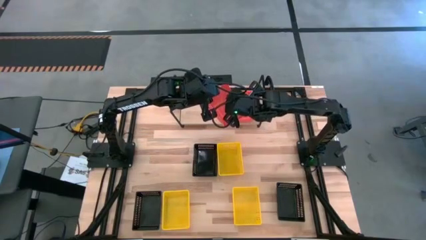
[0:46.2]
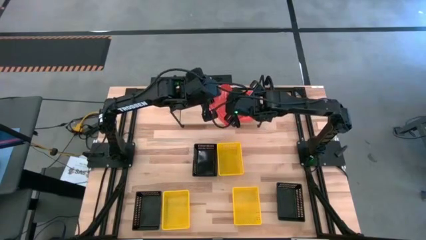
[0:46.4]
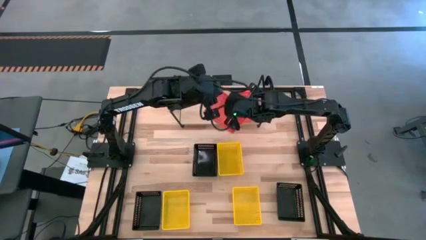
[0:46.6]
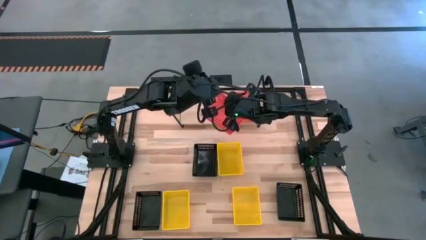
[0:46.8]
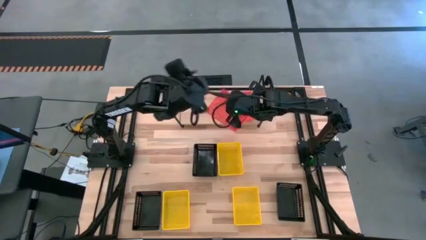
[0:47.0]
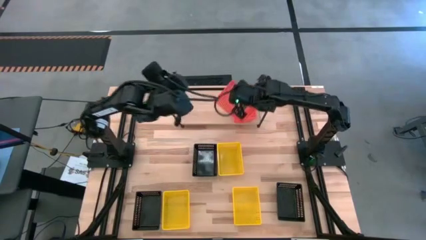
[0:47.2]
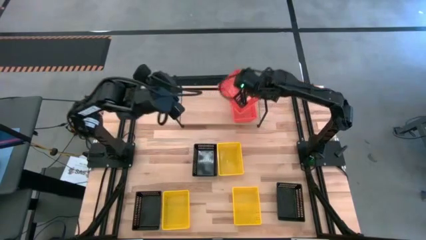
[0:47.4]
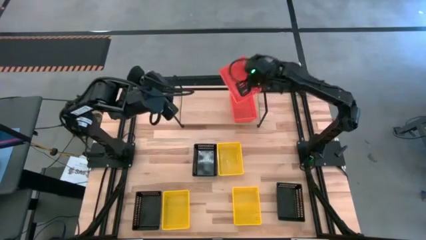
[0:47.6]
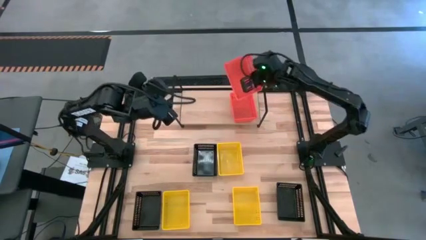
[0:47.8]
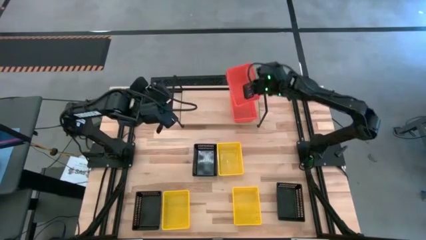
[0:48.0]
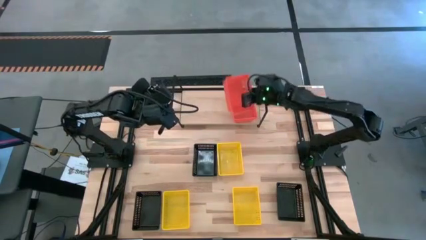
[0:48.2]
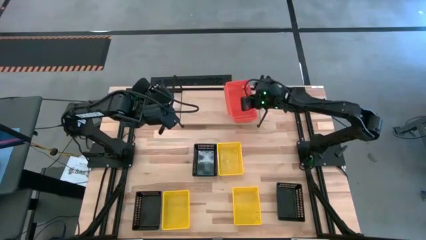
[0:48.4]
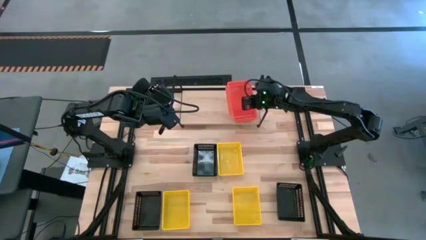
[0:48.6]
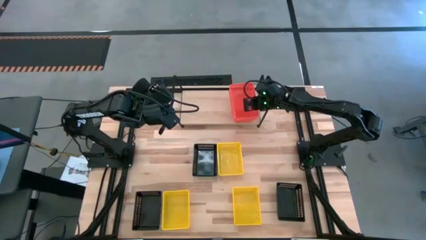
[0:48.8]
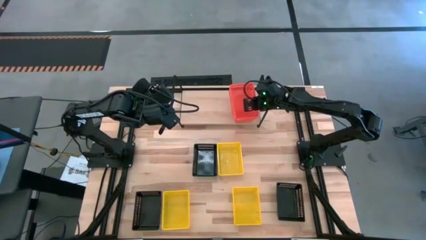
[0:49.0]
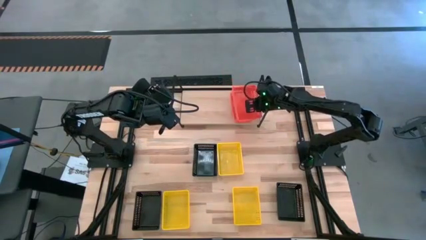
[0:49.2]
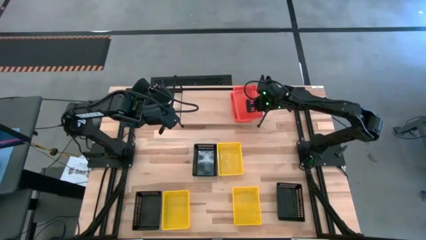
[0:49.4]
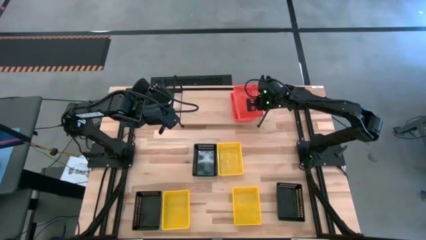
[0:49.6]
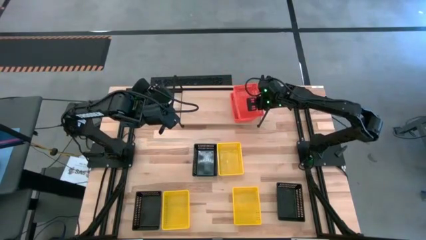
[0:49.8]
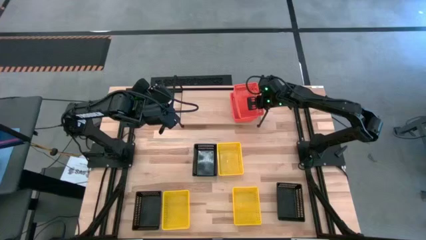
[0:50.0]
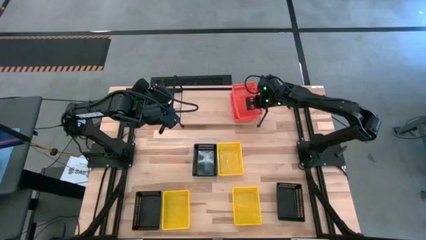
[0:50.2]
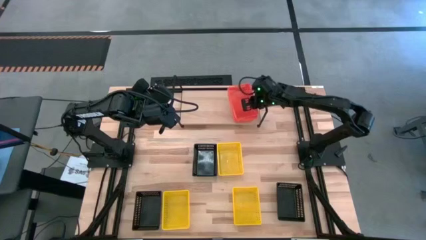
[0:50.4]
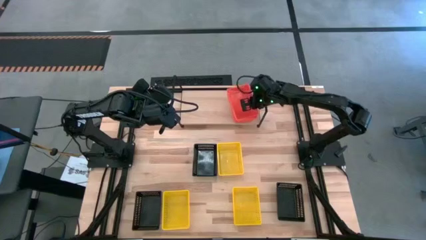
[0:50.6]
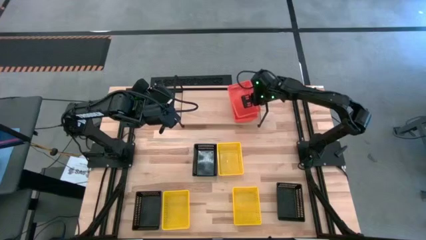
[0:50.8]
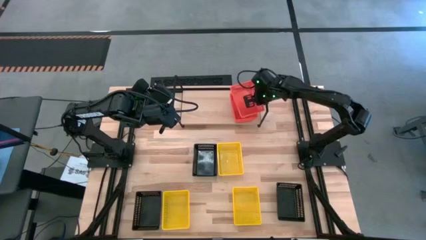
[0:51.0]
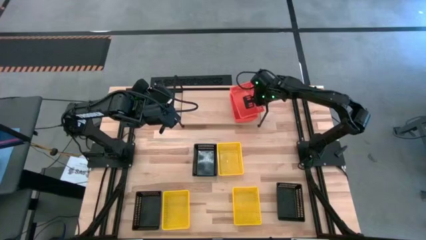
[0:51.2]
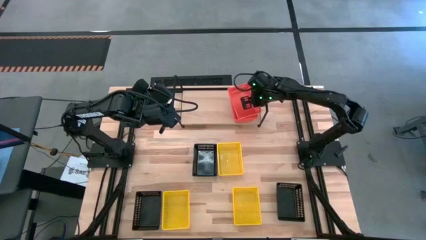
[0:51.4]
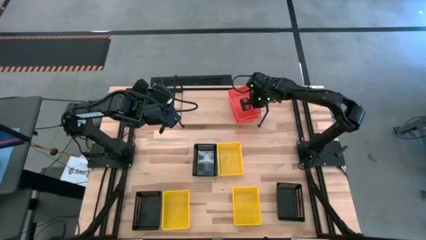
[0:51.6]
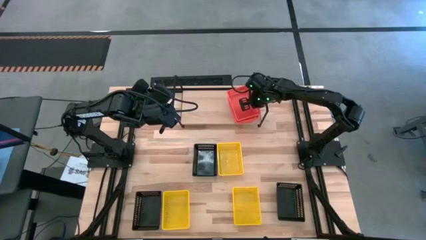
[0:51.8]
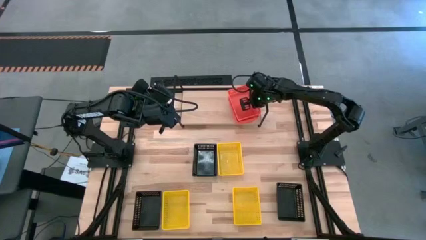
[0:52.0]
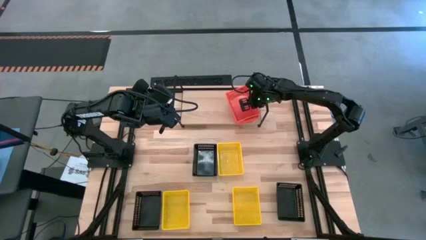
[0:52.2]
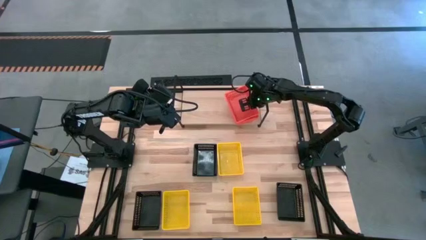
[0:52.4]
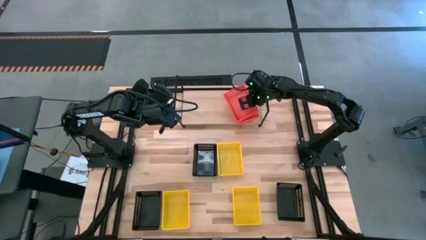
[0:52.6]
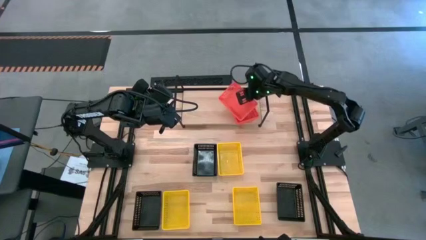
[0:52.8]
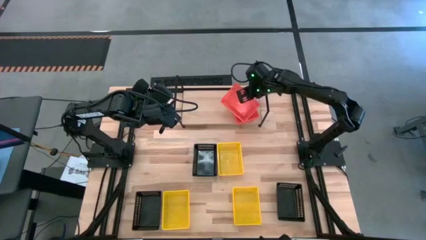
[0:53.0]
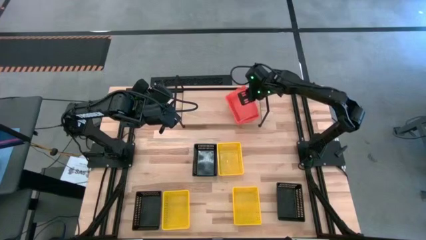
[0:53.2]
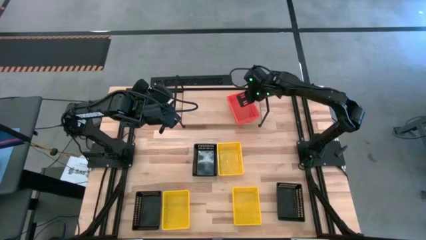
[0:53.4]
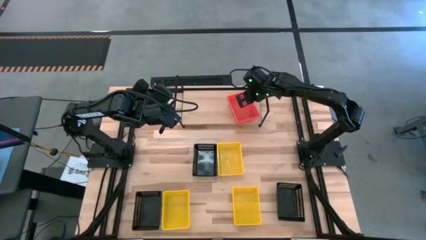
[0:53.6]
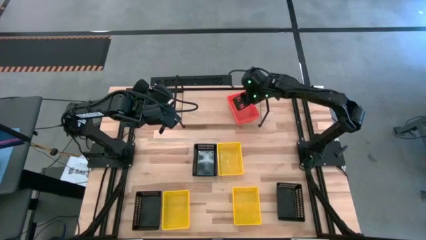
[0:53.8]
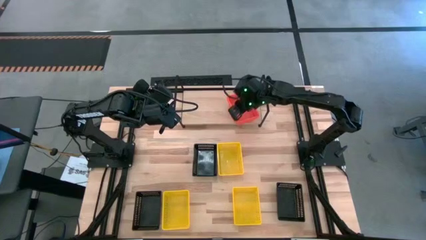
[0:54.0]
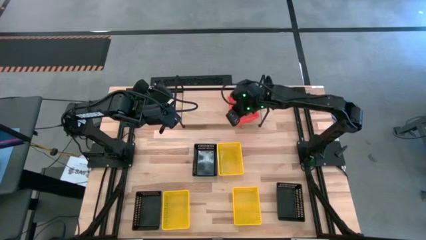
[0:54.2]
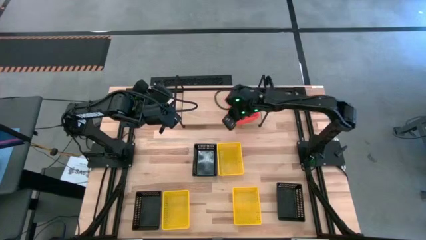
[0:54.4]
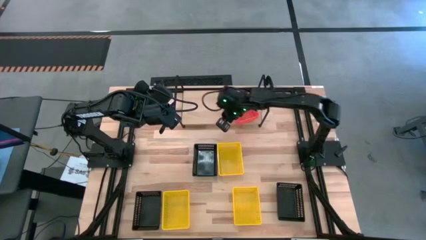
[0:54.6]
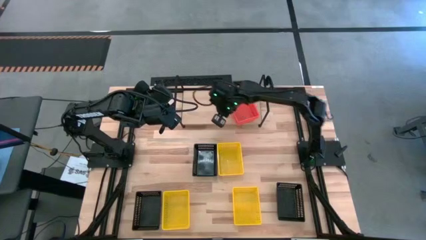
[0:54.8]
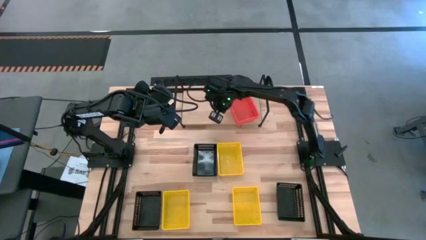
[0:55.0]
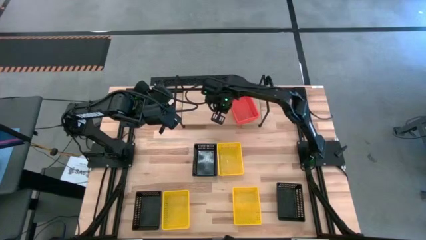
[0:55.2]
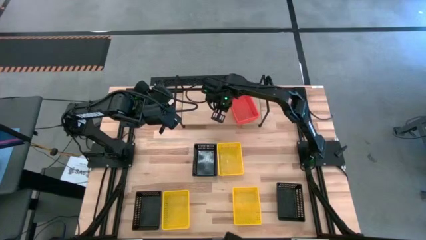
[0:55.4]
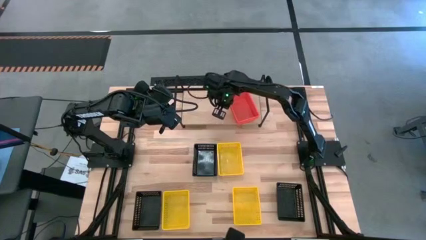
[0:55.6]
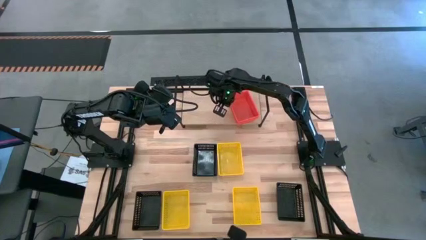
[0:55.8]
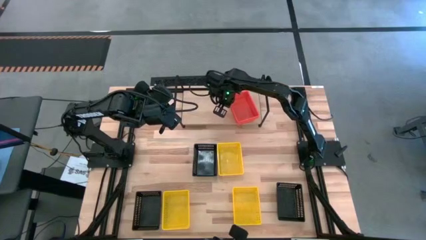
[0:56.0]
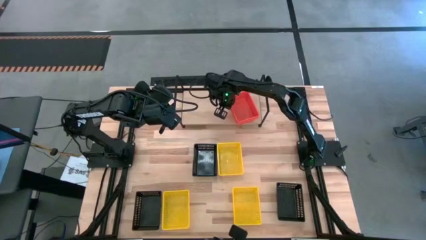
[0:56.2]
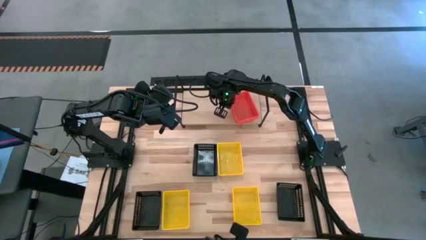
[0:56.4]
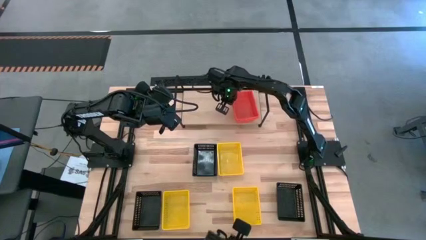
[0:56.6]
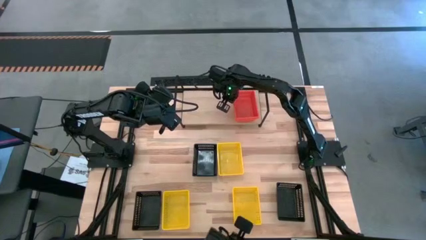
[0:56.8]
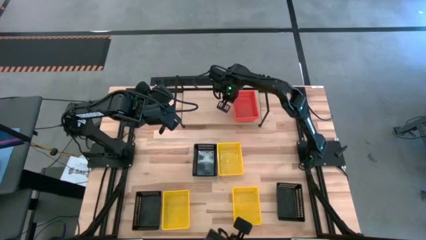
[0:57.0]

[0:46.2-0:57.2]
Task: Stack baskets on shelf by color
Stack the orange bin on top of the other stacked orange bins on the shelf

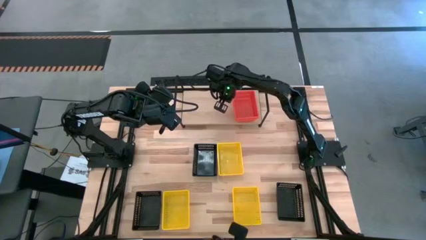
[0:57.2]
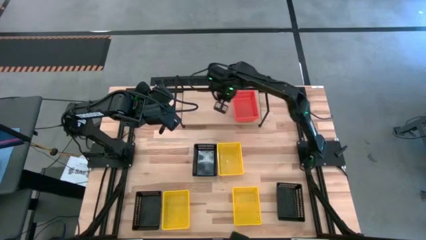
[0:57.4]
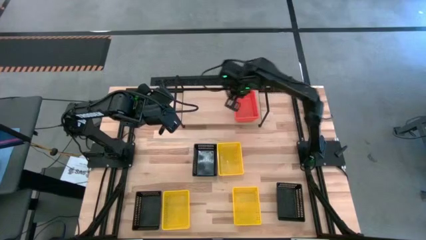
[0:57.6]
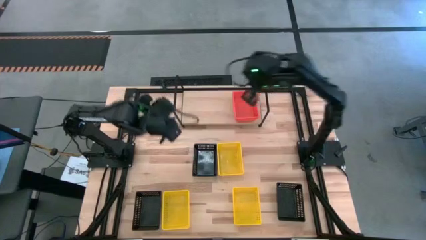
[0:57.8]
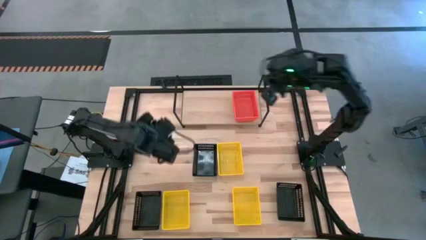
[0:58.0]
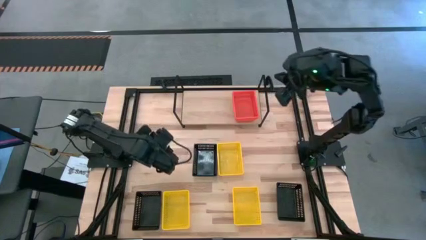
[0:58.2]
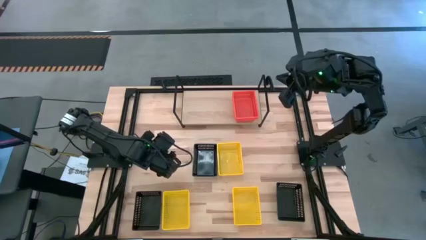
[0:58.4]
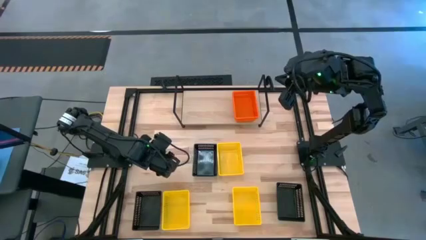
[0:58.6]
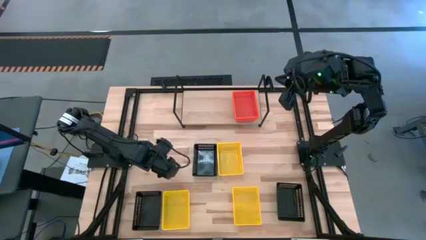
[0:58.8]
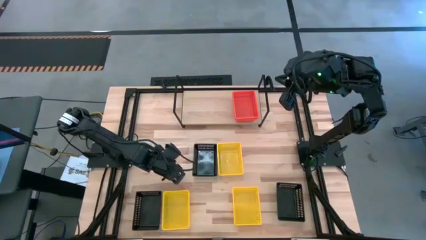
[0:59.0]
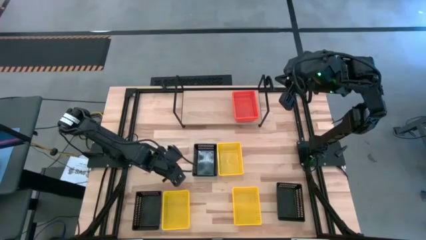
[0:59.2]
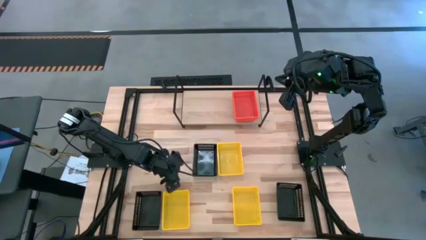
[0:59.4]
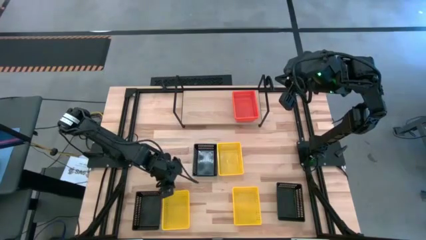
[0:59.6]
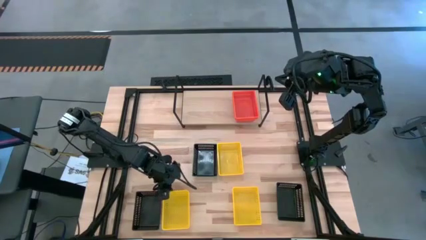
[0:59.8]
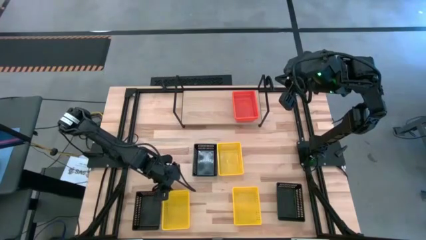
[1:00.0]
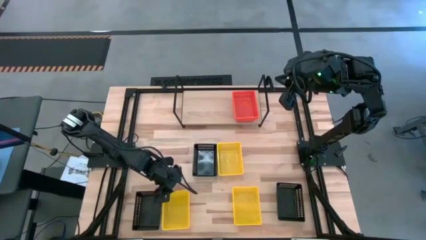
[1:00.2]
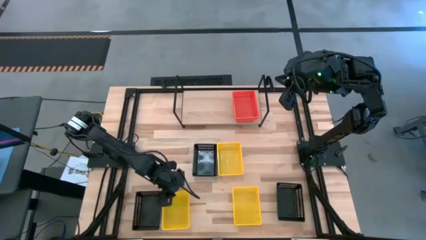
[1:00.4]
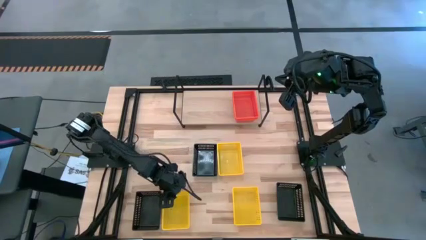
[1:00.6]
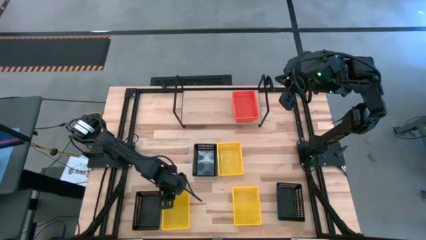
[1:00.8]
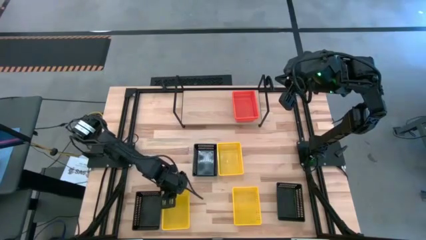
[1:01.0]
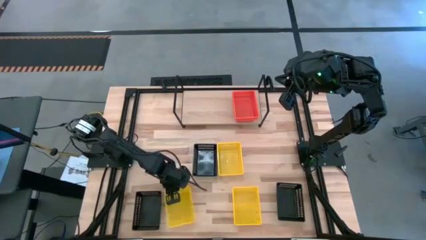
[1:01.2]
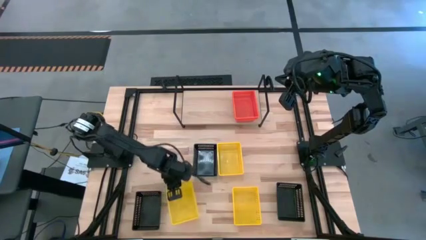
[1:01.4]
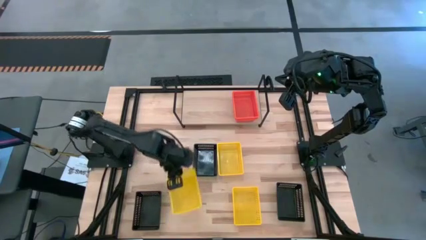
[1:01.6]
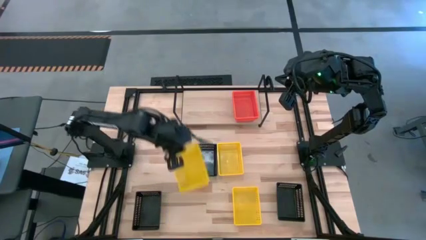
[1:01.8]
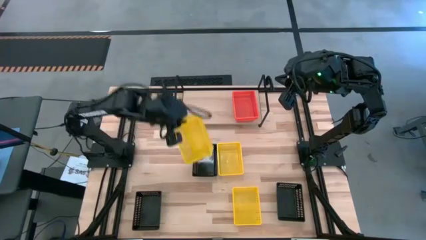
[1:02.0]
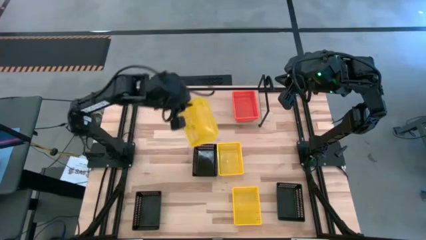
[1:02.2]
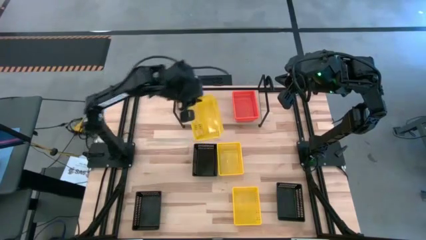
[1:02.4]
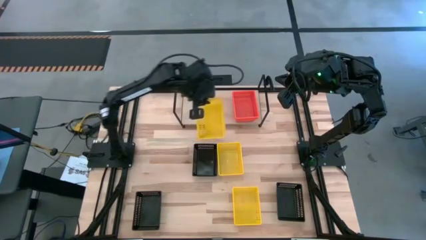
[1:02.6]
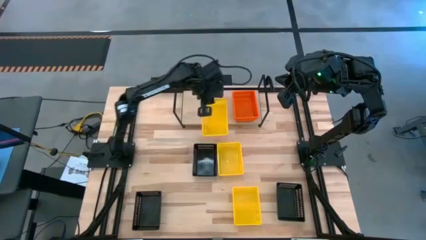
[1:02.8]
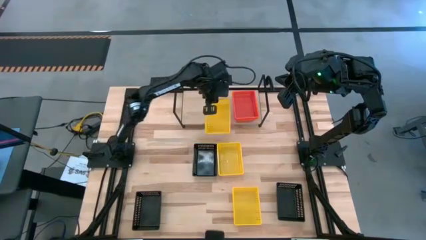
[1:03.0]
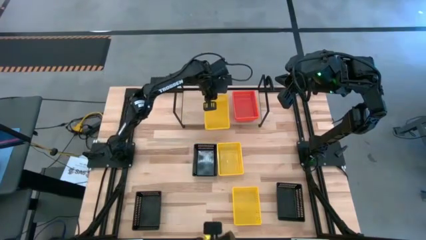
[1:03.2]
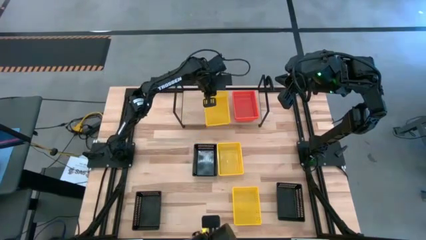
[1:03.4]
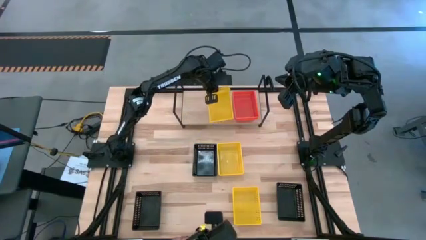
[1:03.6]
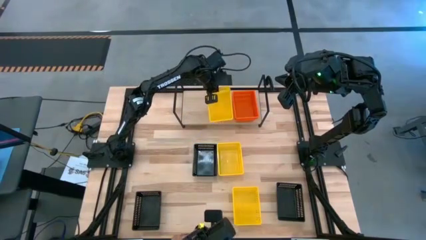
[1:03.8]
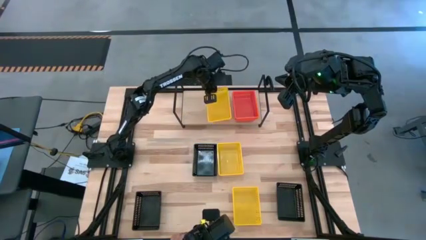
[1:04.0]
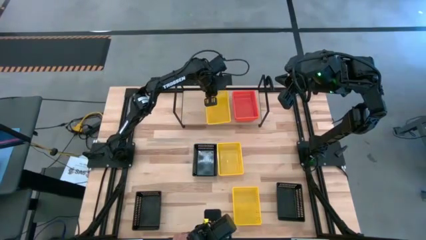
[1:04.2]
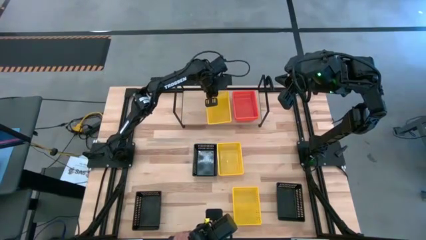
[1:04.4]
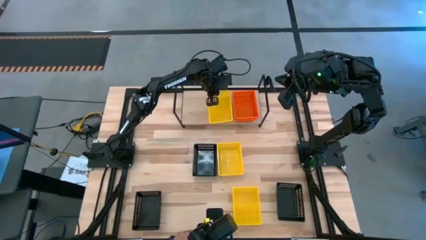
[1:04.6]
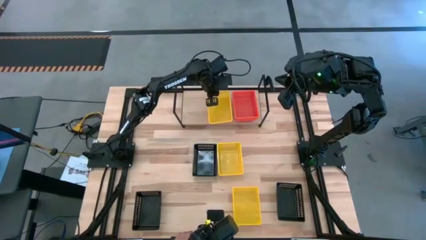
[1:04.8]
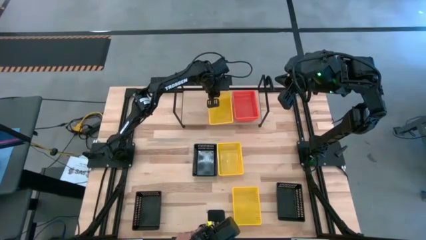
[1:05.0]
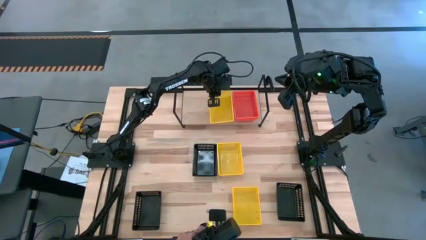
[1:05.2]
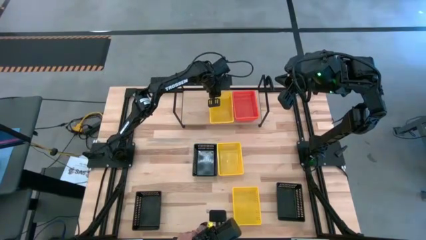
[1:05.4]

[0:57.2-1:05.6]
Put the bottom left yellow bin on the shelf
